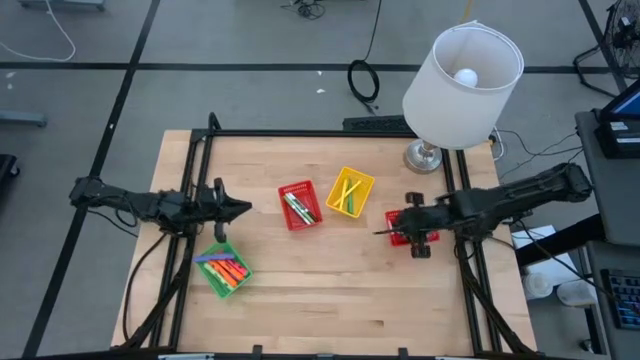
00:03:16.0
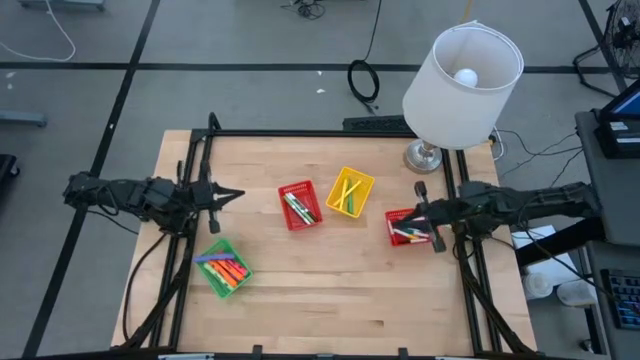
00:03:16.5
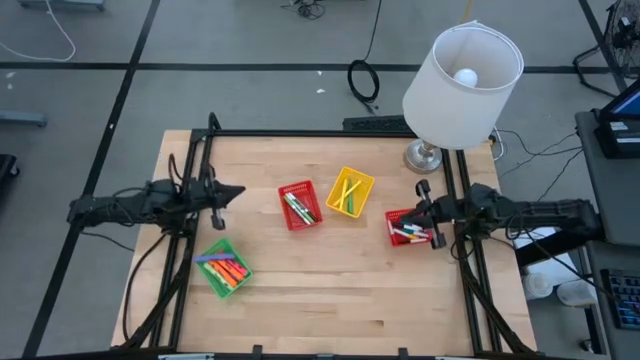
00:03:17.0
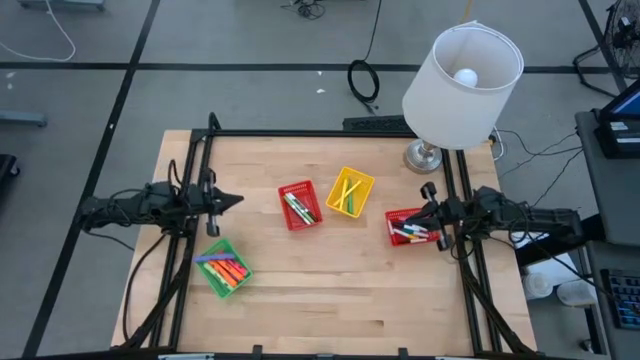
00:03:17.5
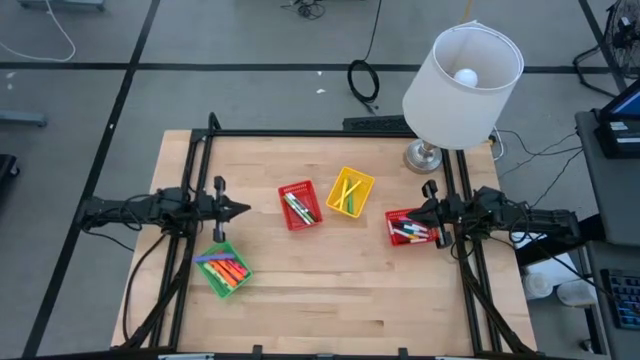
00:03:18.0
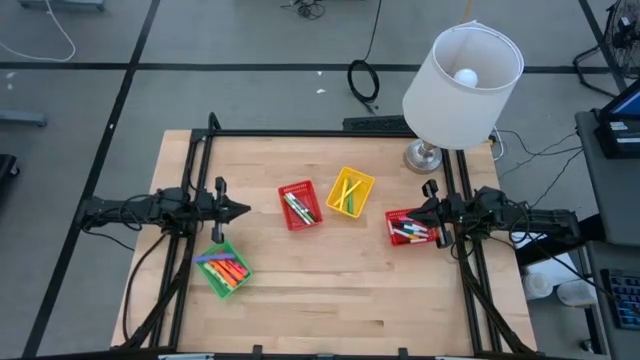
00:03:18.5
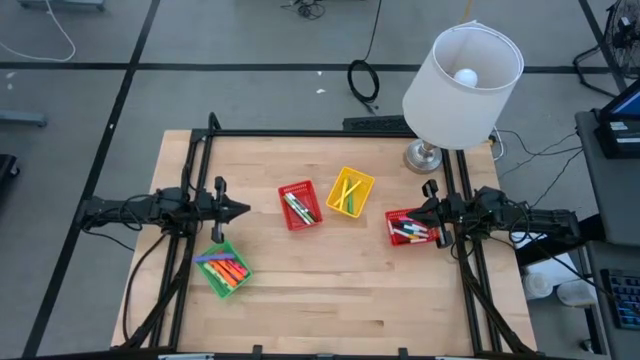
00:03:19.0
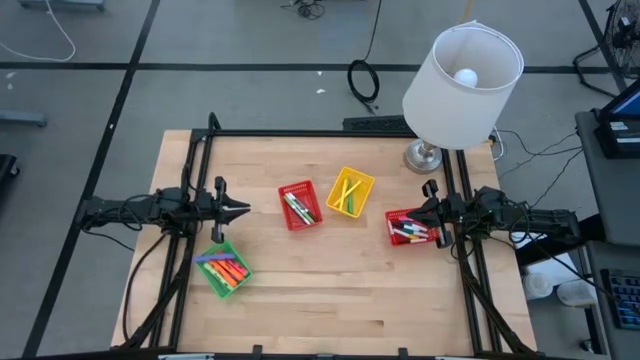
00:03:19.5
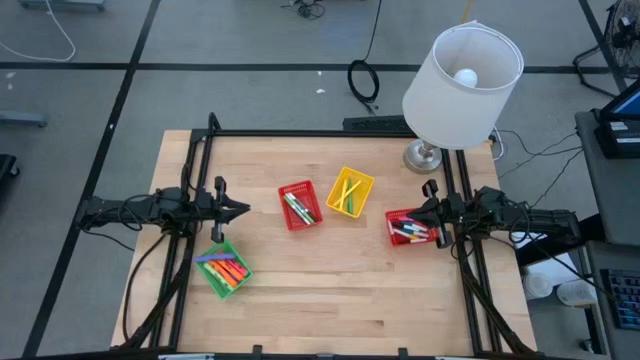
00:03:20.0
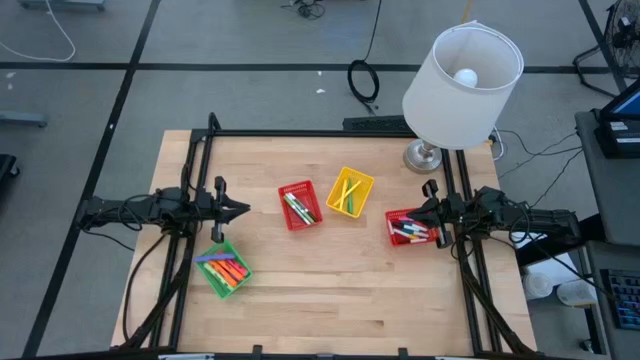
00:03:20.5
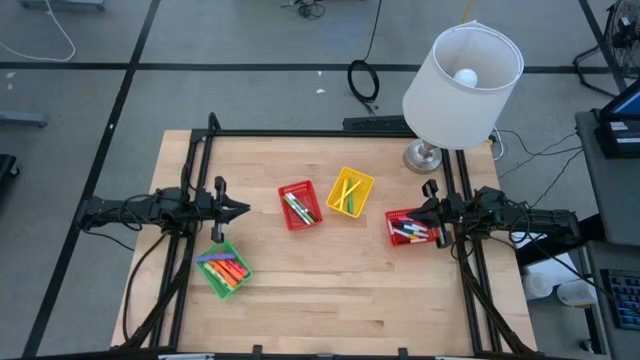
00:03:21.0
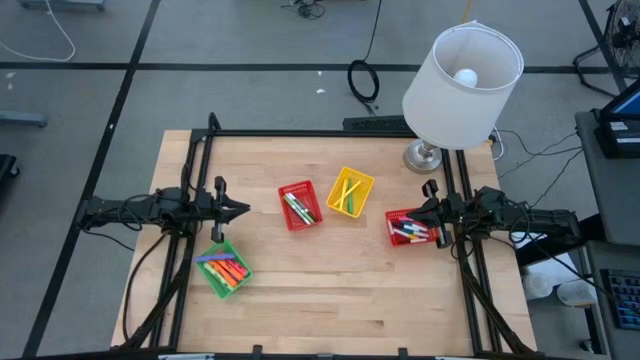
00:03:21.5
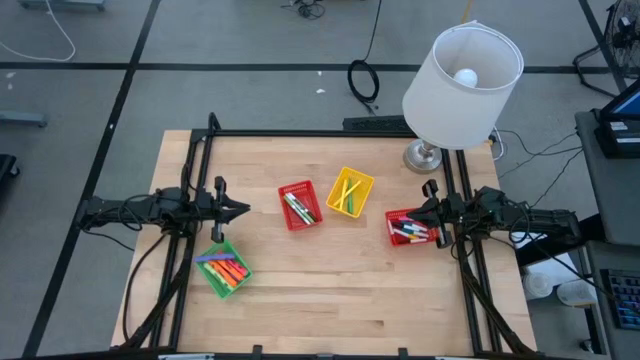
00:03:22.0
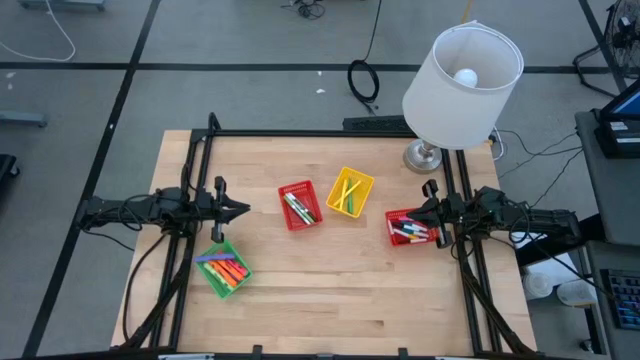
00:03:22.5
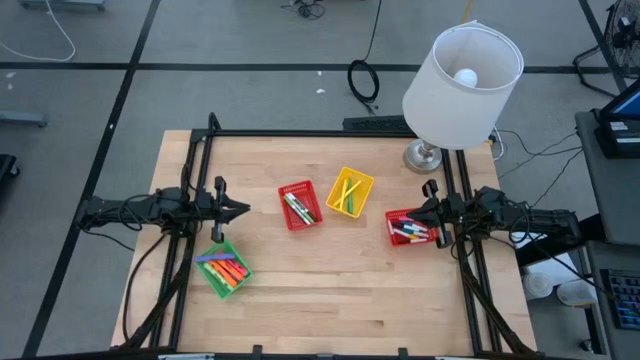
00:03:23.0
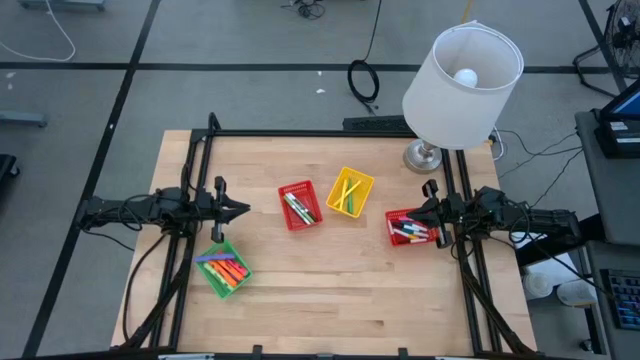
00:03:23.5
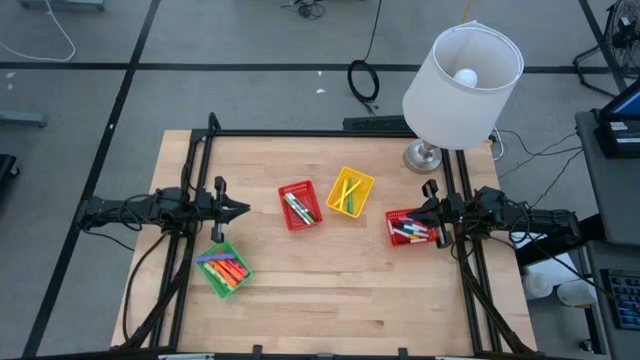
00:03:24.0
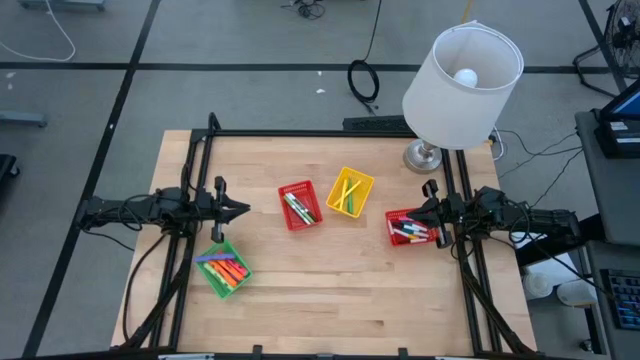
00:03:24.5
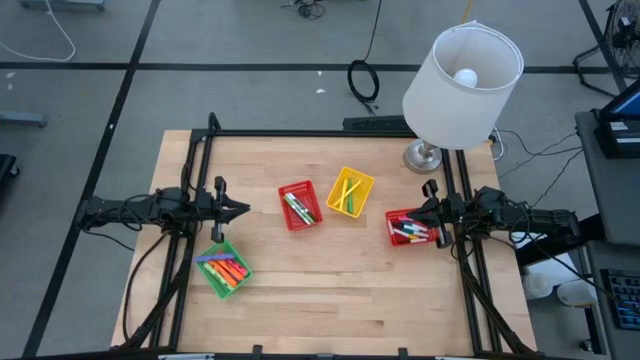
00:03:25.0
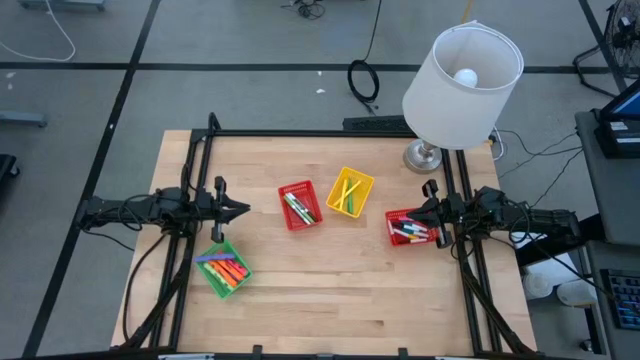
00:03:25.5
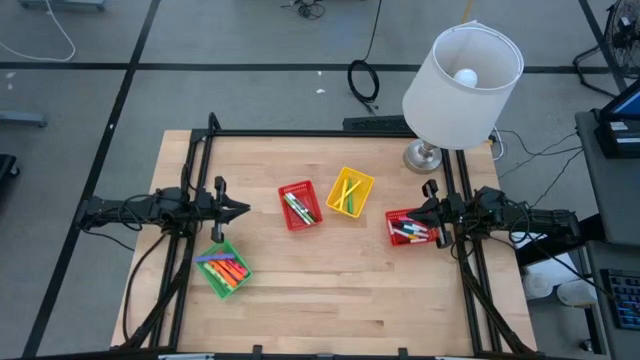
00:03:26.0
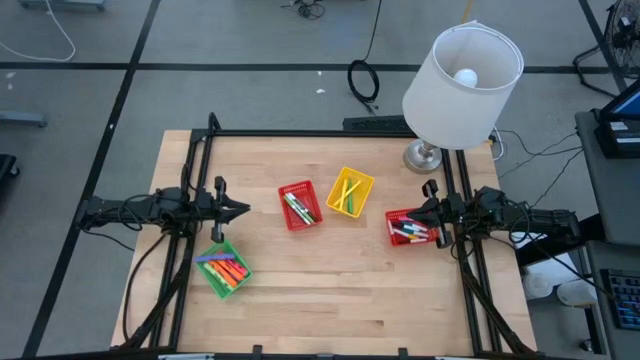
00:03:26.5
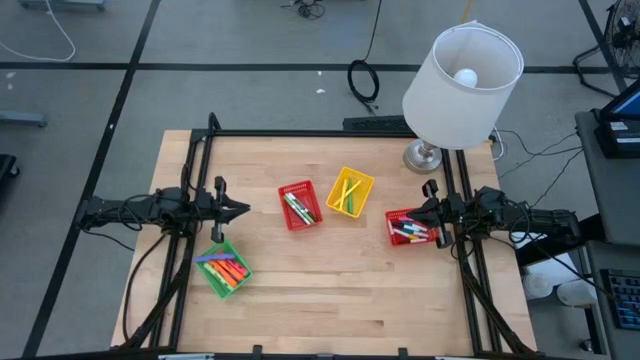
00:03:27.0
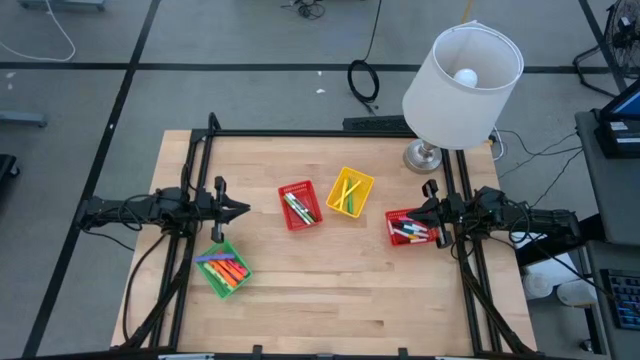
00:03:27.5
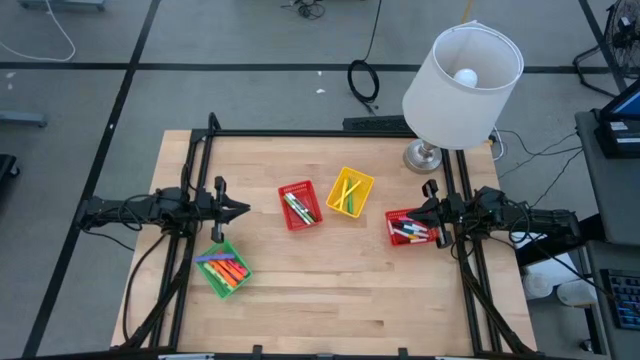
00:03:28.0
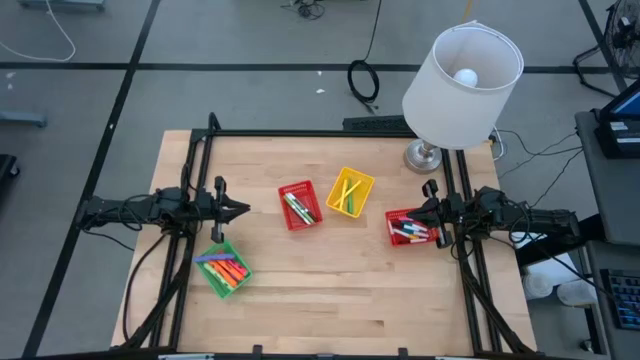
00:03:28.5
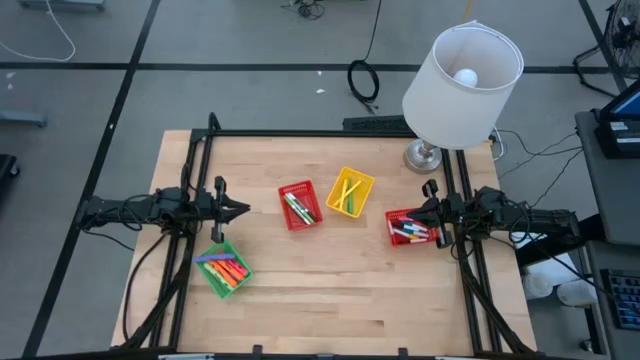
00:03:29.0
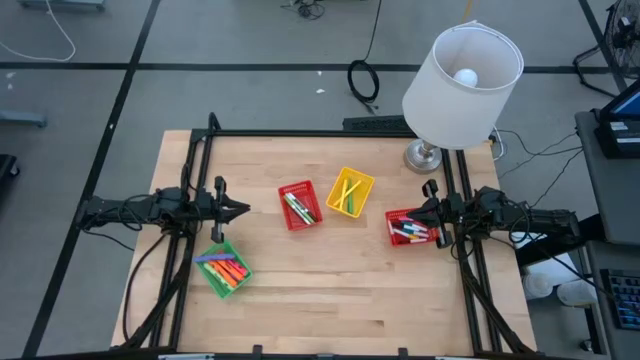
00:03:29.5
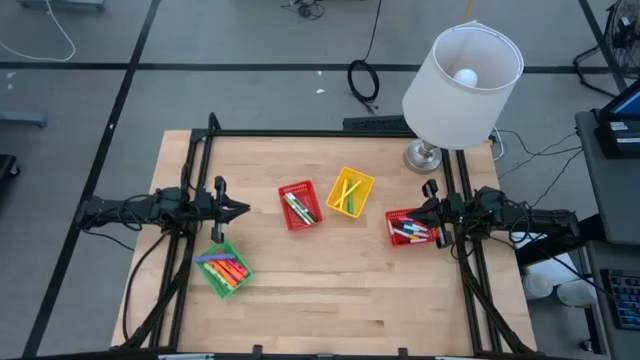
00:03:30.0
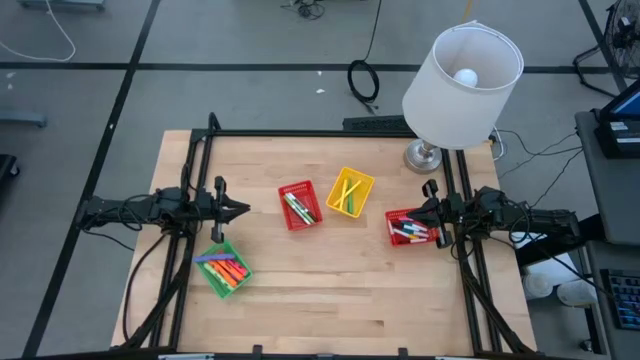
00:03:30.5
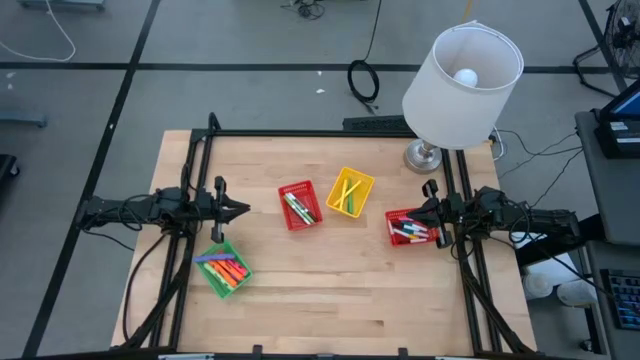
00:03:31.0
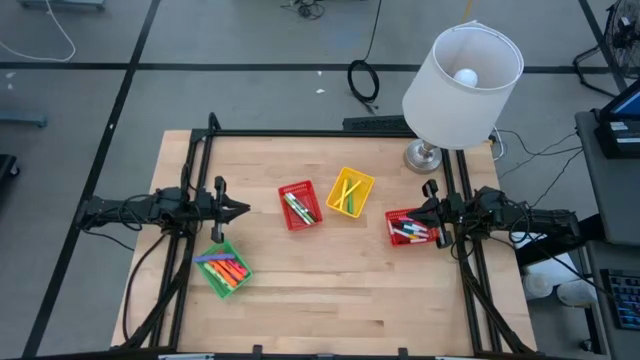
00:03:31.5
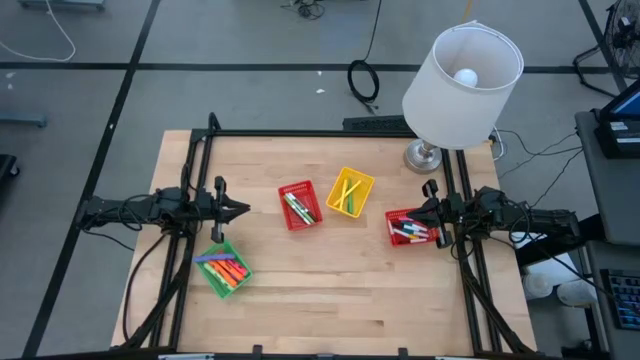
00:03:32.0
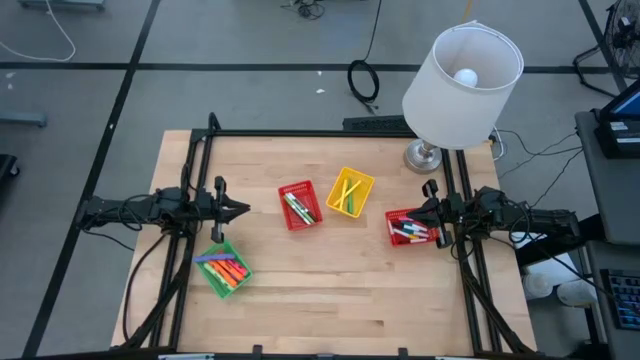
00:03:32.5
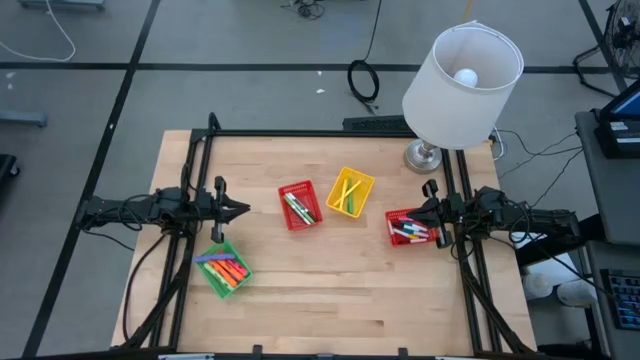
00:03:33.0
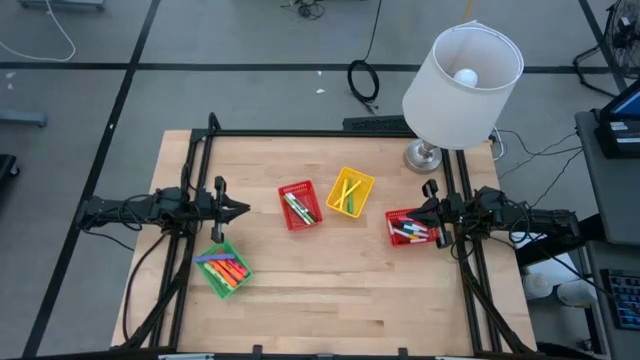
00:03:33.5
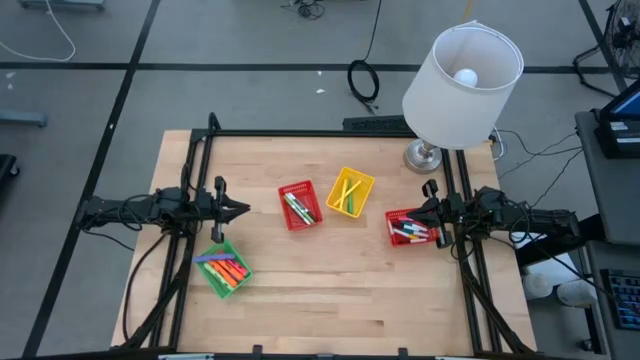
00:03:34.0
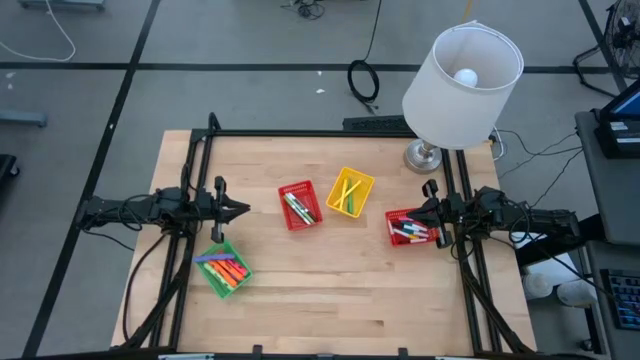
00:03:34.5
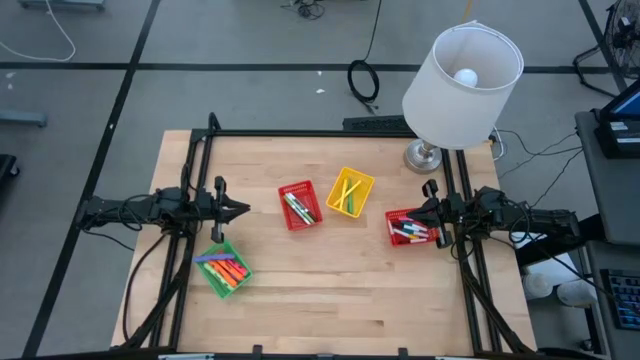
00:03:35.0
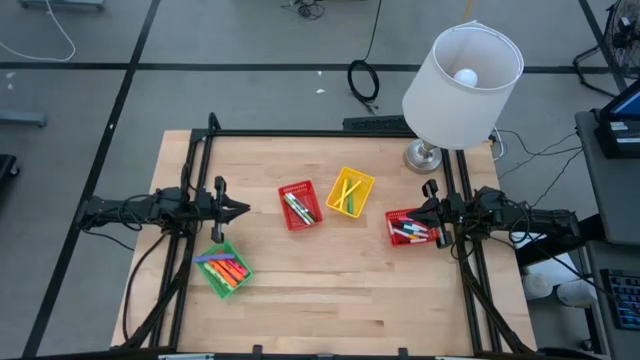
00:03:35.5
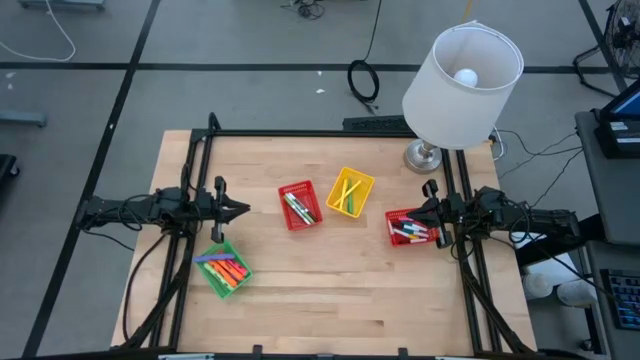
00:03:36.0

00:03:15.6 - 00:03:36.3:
Task: Pick & Place Markers
Return to Home Position
